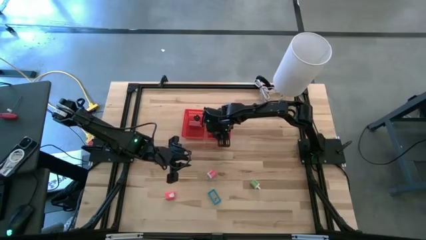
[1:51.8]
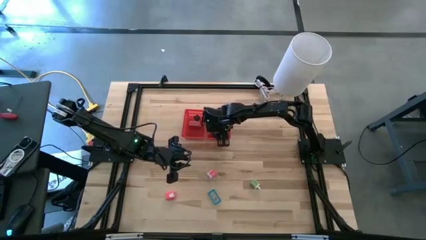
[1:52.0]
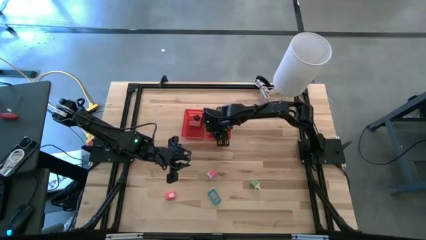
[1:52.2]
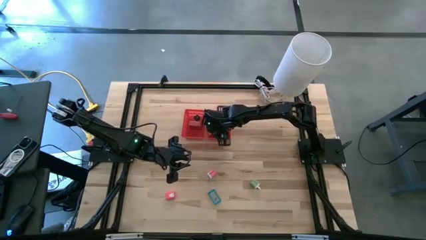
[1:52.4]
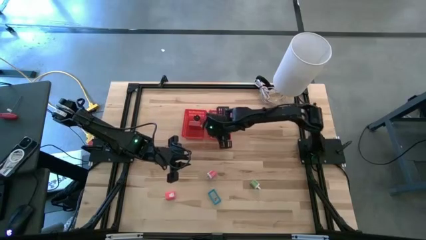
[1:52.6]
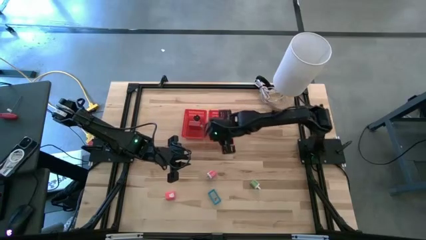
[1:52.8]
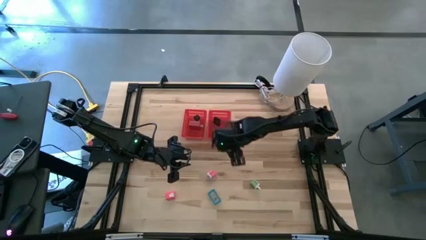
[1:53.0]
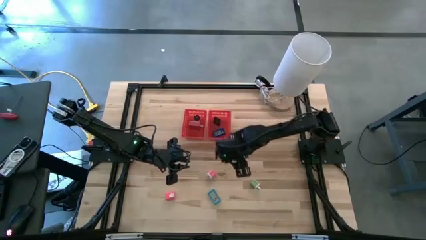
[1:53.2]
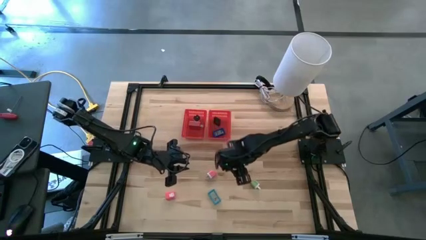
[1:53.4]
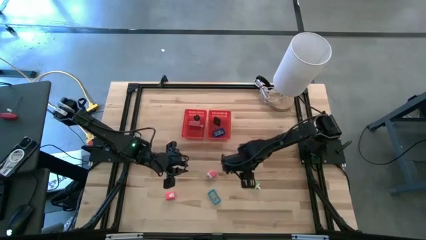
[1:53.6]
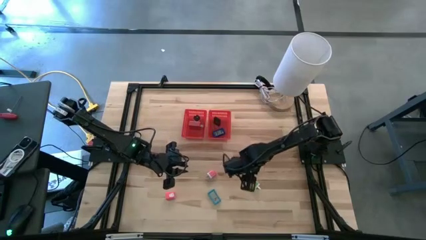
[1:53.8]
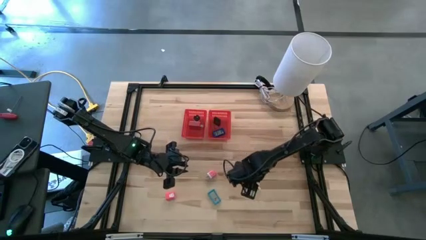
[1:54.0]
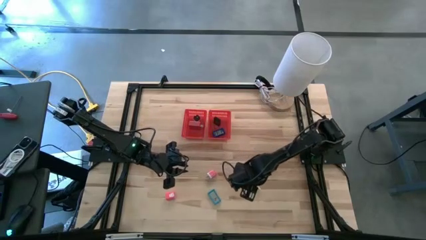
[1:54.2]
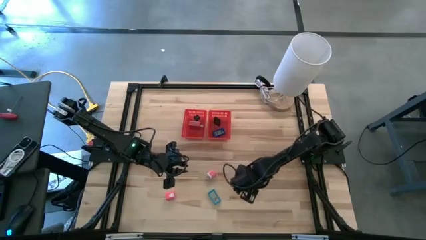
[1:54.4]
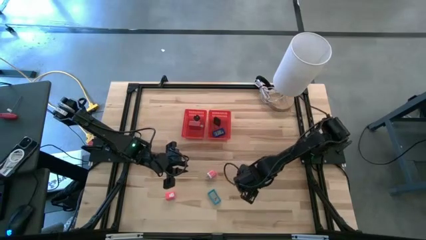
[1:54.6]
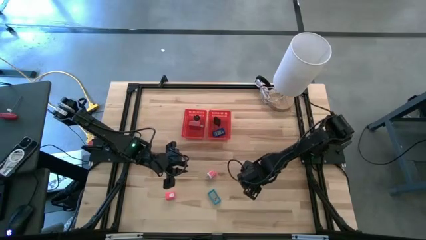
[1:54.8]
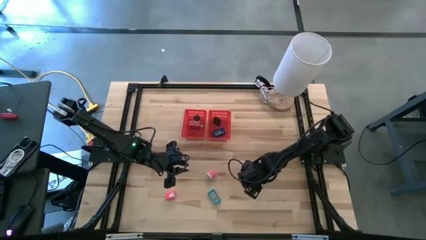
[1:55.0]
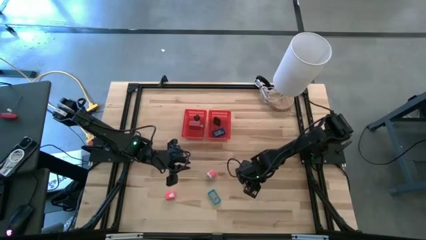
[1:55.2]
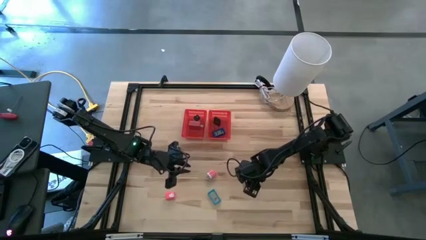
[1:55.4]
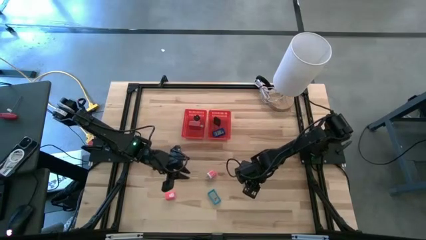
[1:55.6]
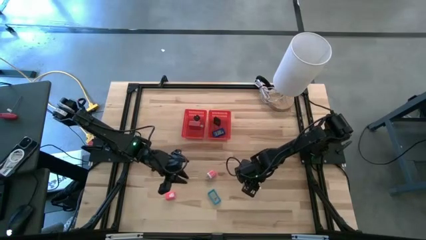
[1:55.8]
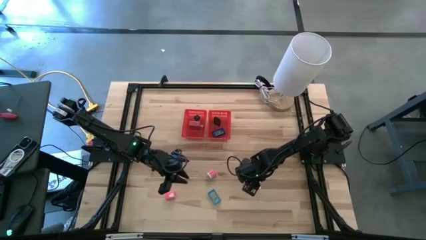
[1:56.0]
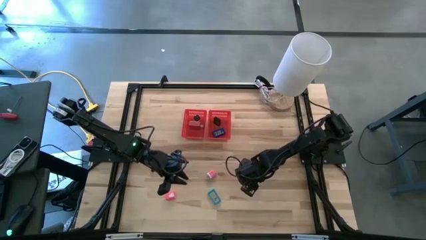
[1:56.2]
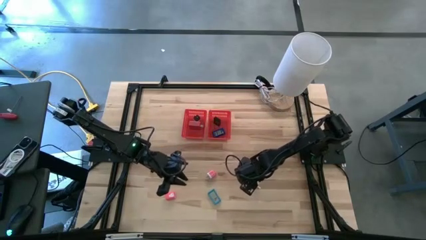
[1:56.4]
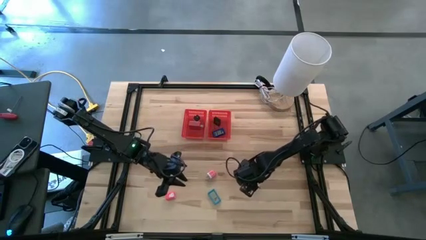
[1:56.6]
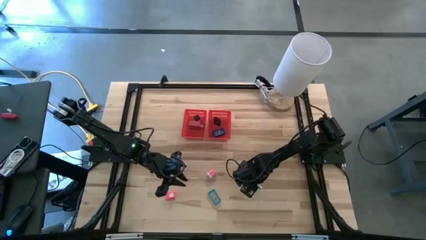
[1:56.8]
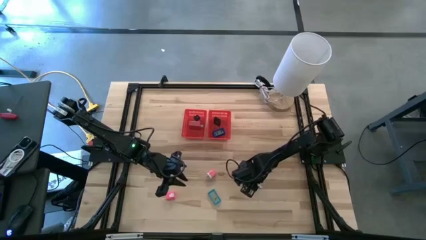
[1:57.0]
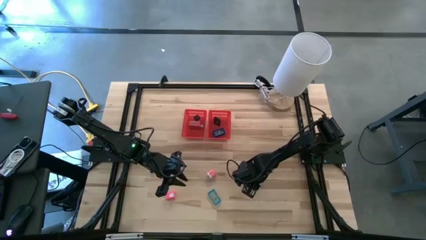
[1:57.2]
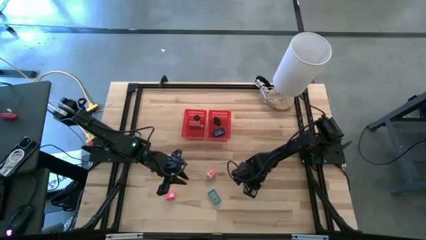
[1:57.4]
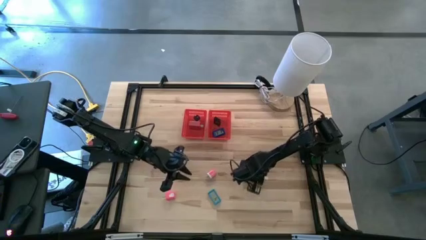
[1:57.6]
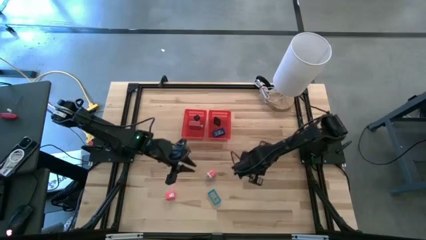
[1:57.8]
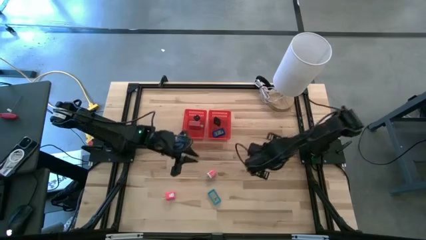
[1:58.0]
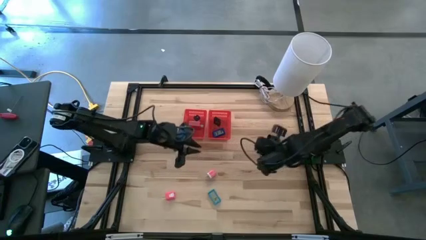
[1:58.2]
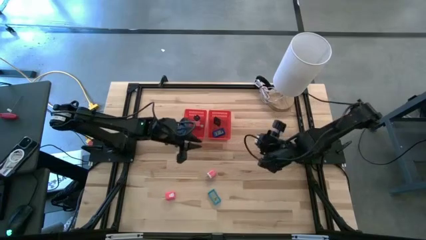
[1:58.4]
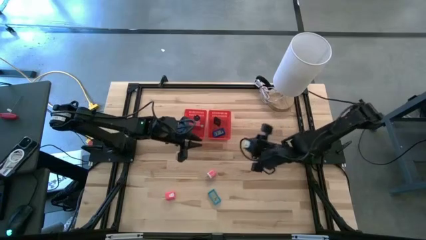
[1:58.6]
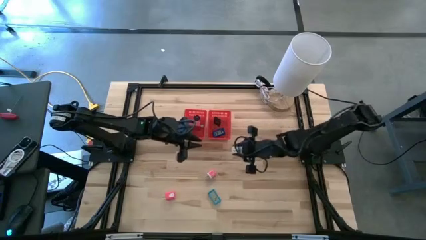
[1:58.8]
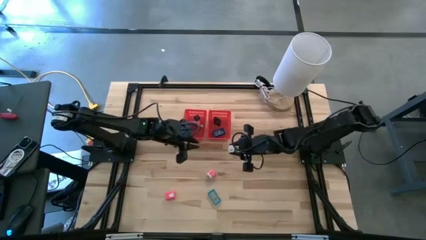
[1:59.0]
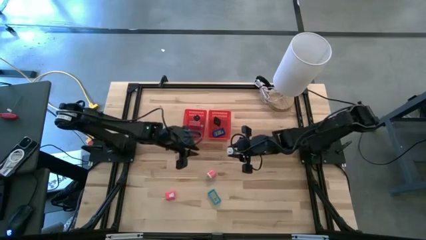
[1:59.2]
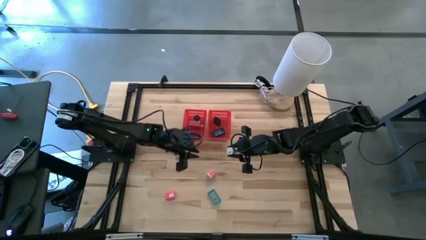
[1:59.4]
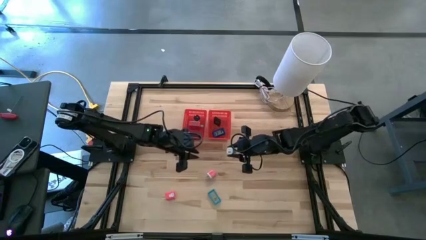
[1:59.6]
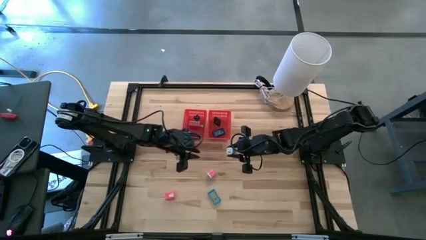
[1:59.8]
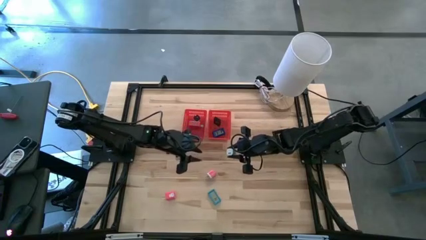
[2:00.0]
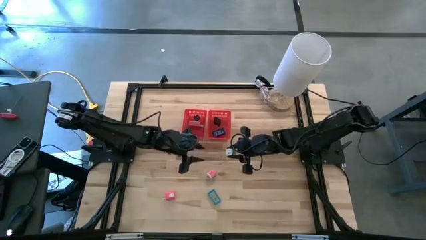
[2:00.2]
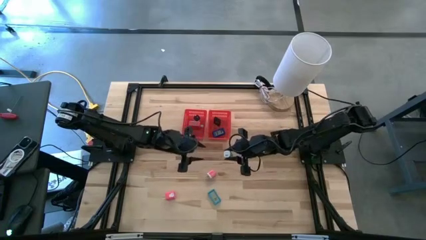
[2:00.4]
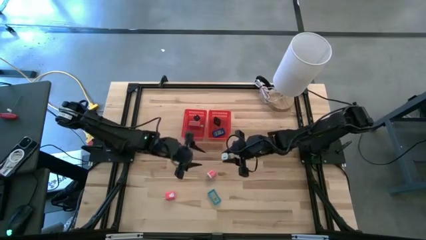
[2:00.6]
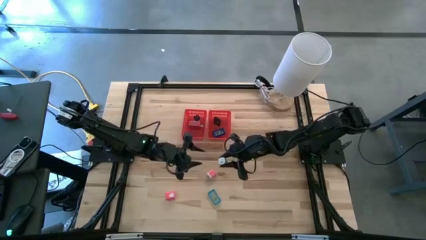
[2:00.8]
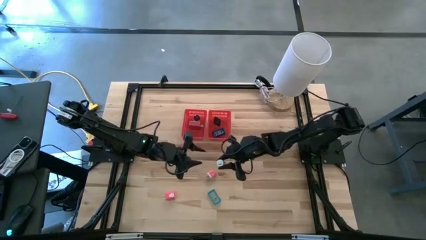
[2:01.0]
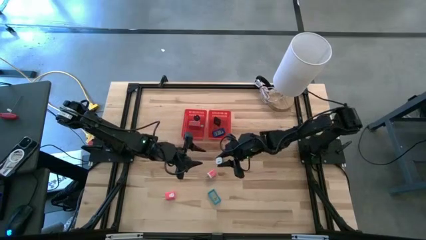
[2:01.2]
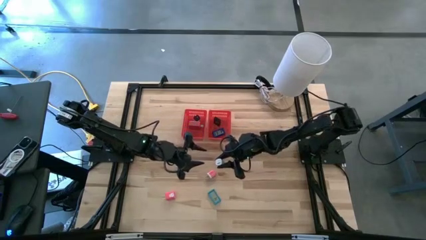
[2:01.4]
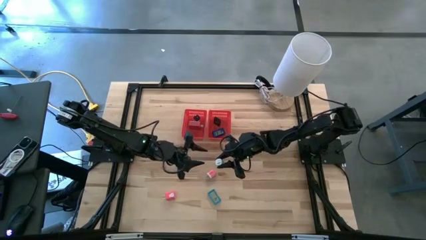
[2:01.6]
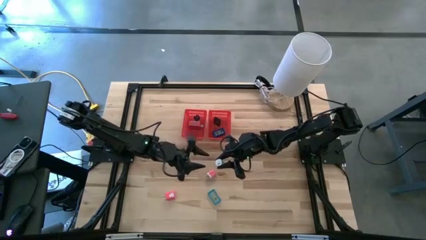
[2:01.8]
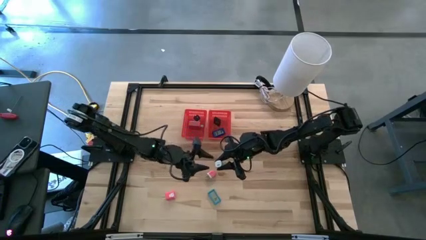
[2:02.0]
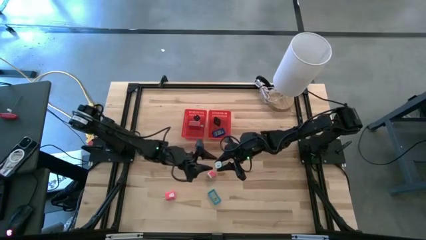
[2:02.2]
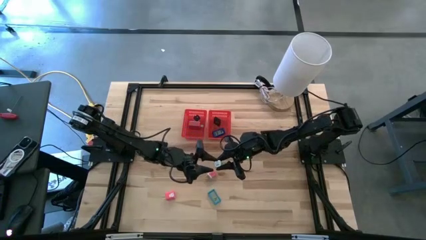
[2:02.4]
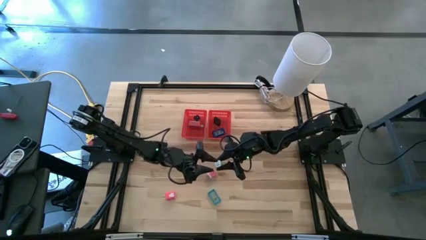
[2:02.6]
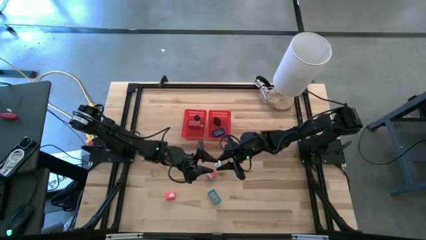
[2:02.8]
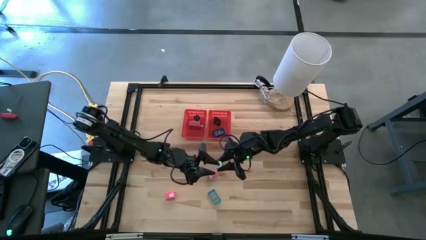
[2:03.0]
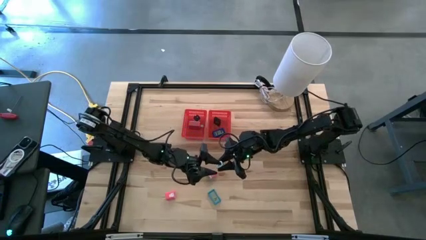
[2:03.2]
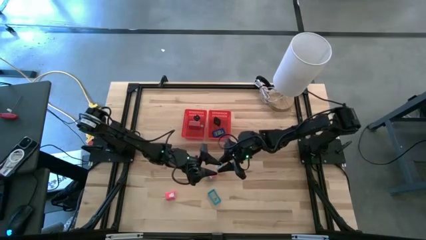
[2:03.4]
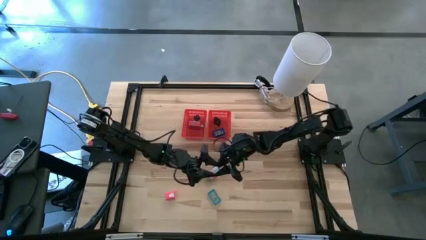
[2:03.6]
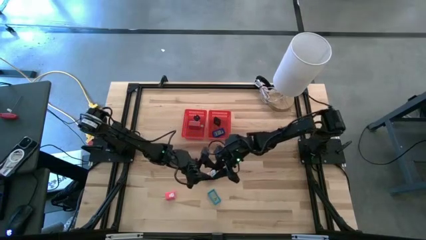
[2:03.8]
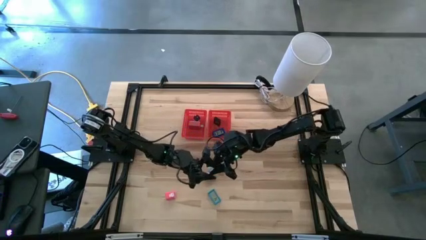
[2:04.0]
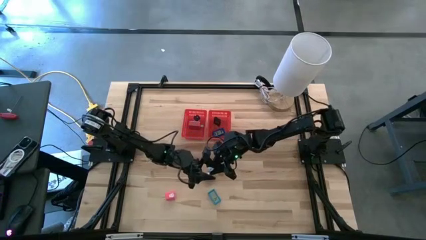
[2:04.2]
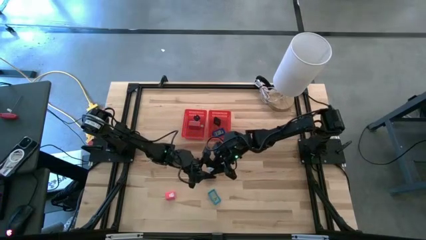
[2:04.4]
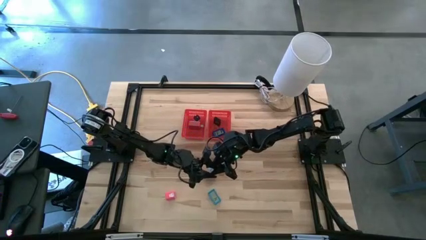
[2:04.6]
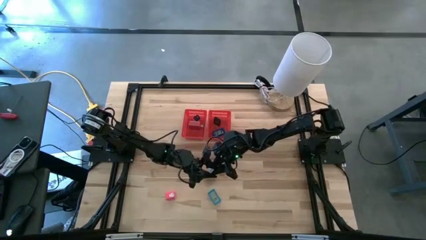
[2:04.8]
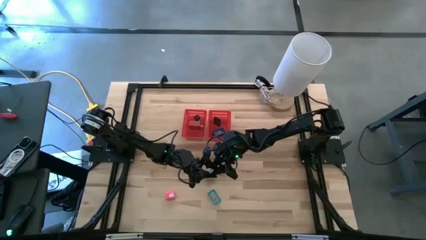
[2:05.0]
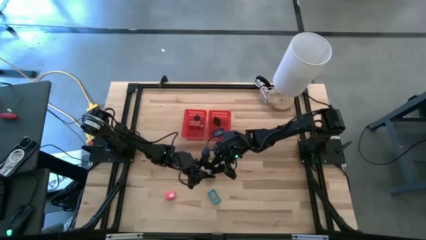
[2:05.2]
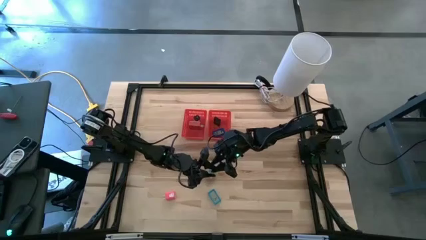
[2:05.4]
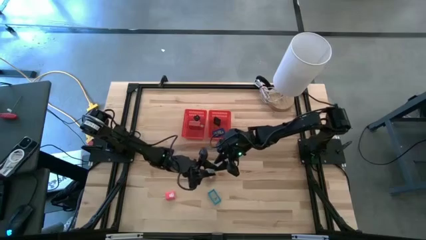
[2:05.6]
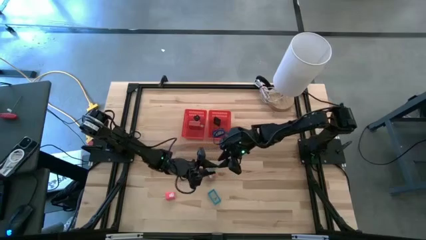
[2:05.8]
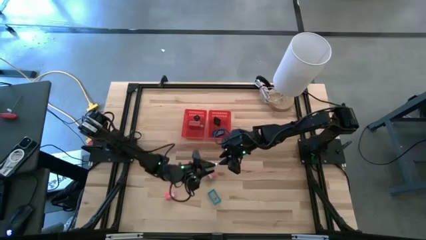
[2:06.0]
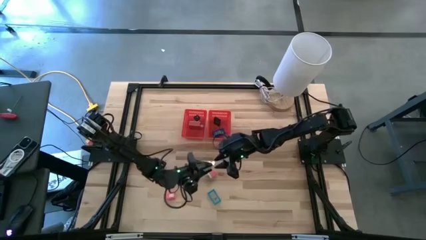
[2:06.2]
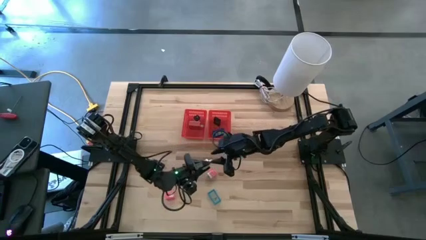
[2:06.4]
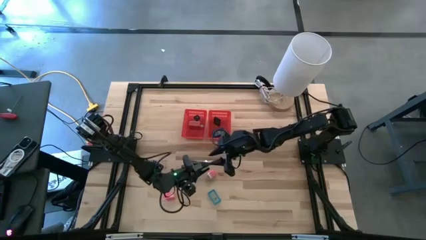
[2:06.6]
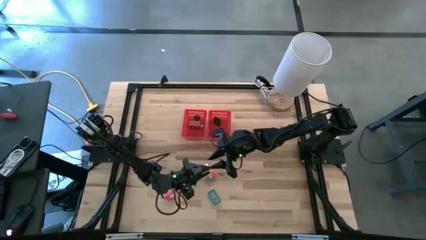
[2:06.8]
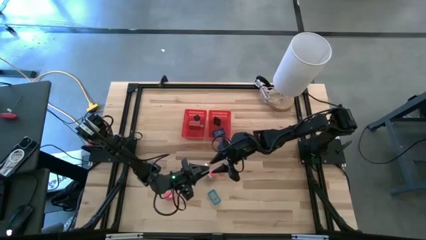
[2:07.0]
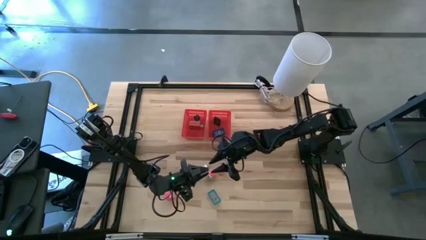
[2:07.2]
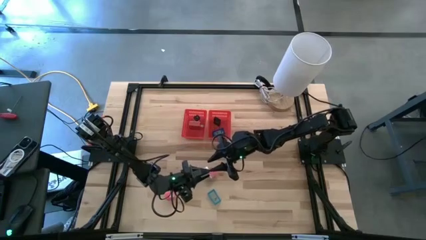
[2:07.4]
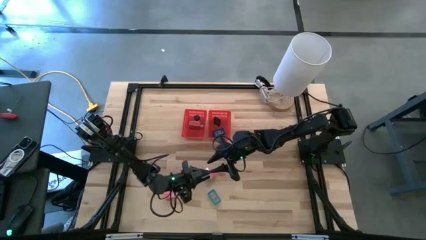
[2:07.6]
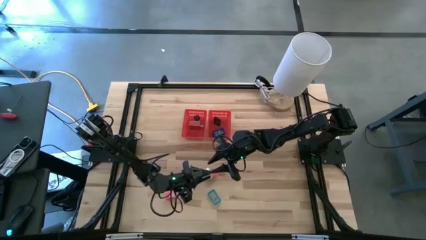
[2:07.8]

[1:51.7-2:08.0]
Task: Pick & Place Office items
Put the green charger adapter into the left red bin

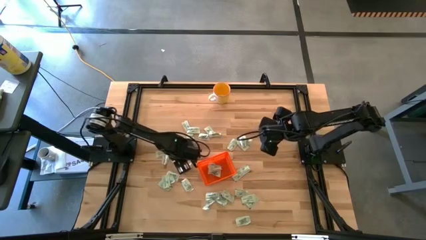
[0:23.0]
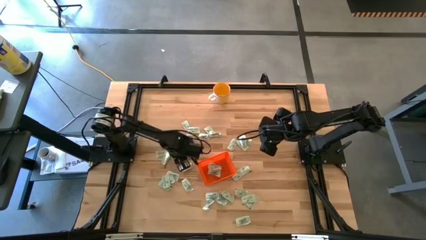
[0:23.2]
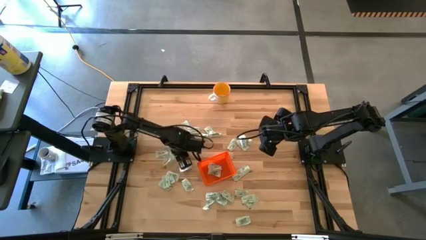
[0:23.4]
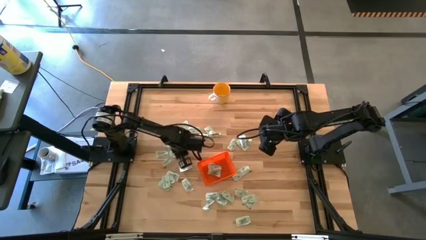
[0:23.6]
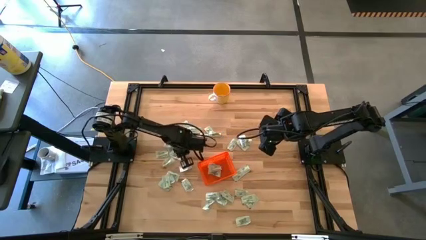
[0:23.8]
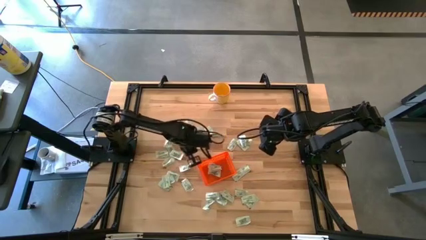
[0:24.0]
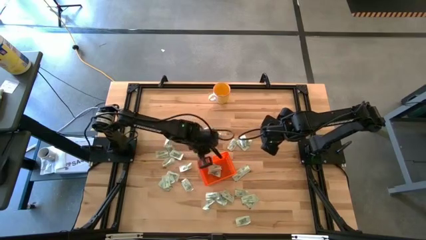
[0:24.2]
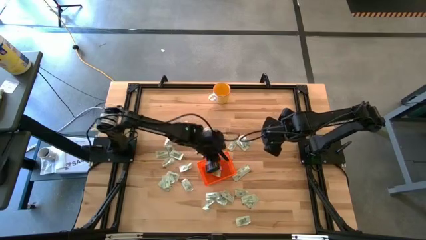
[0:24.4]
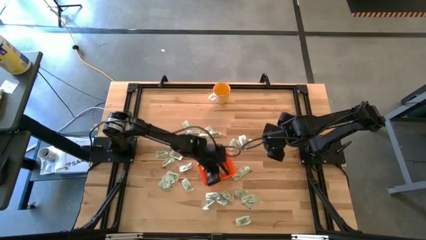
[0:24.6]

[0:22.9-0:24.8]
Task: Pick and place Stevia / Truvia into bins
Put the stevia packet into the bin
